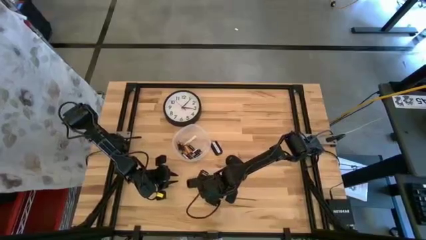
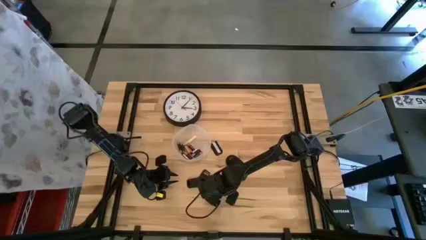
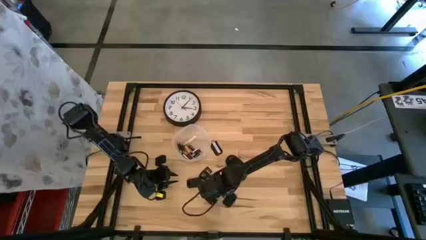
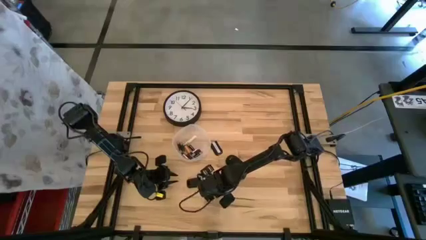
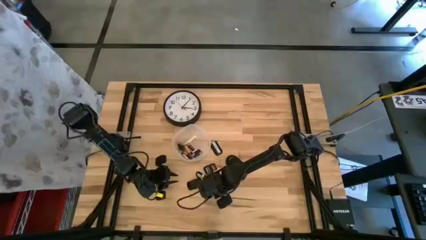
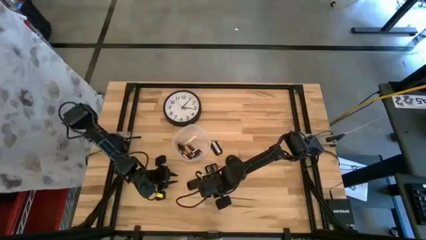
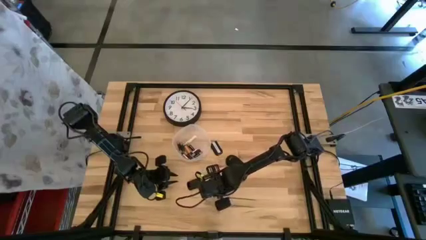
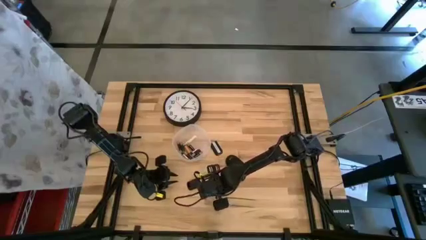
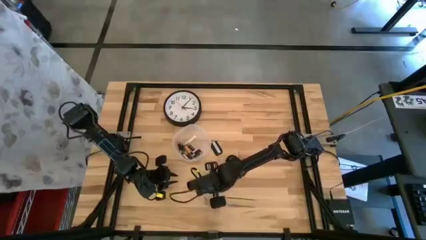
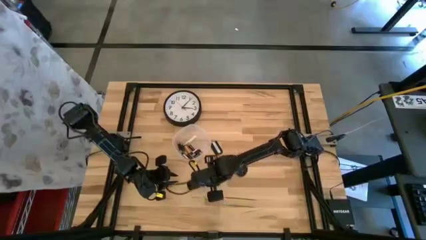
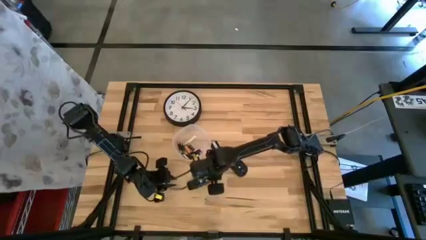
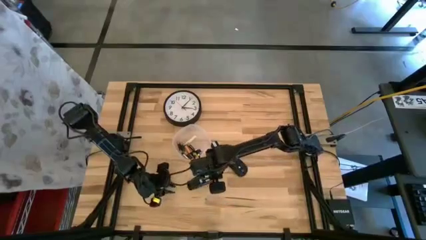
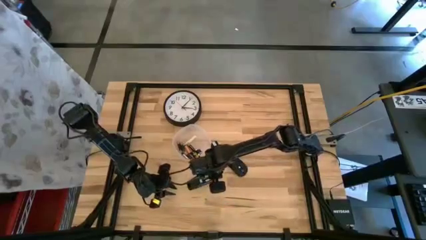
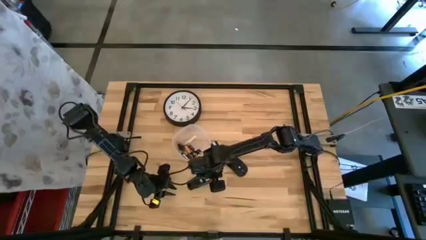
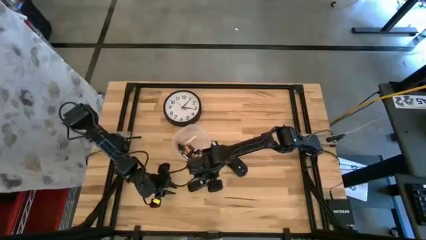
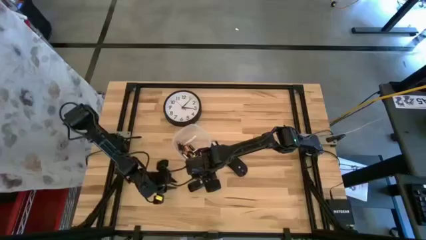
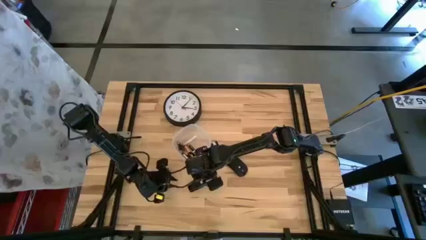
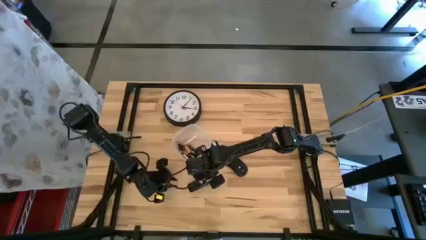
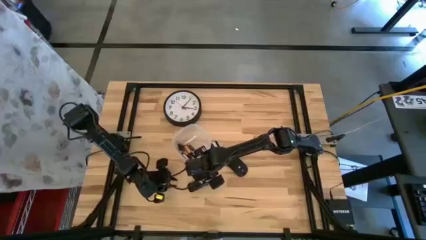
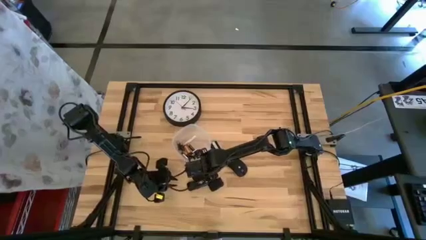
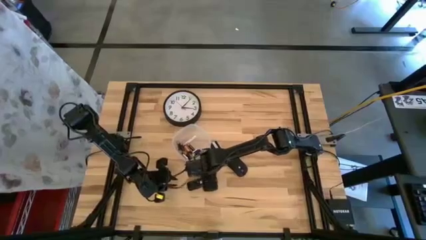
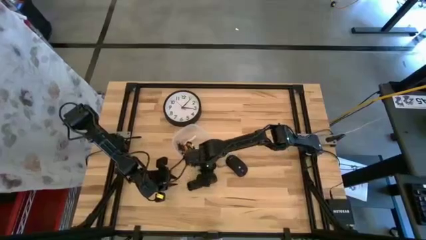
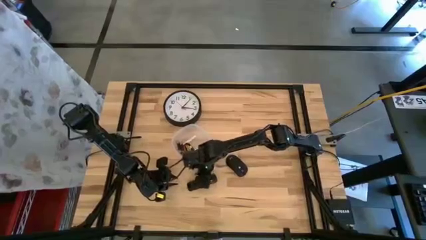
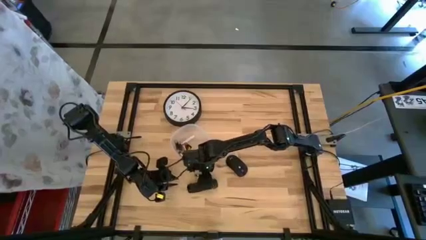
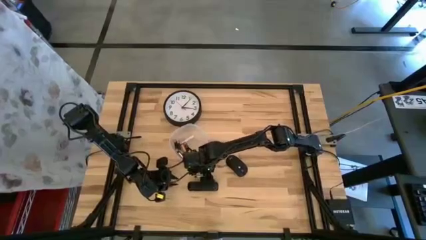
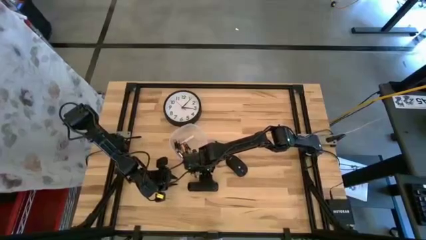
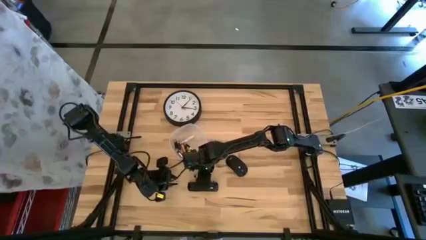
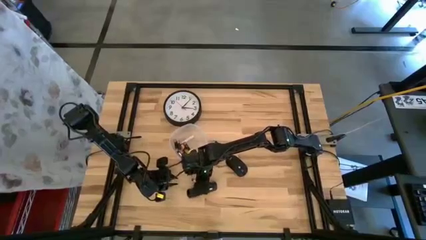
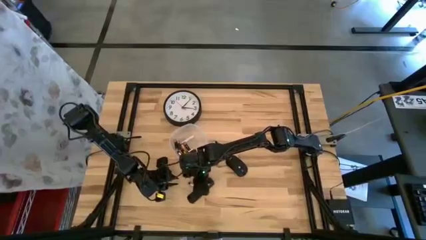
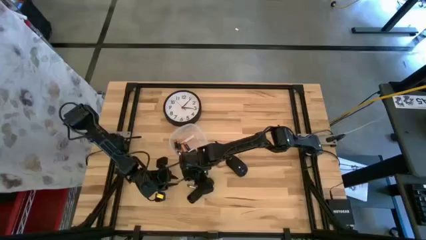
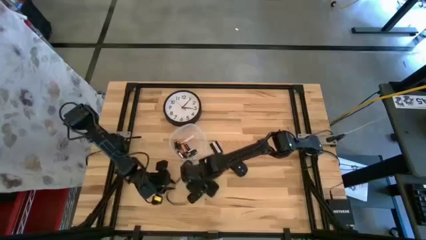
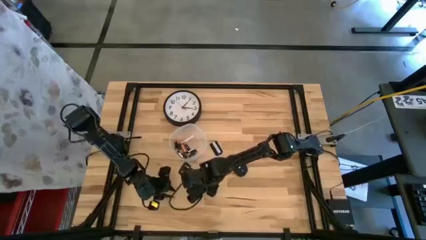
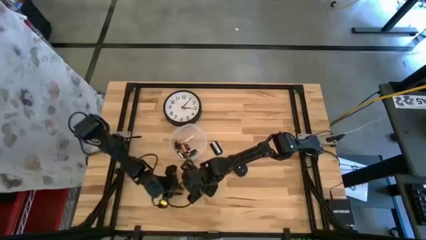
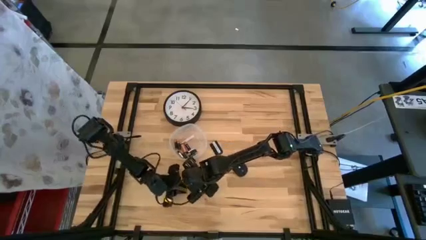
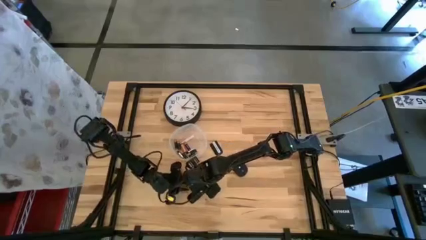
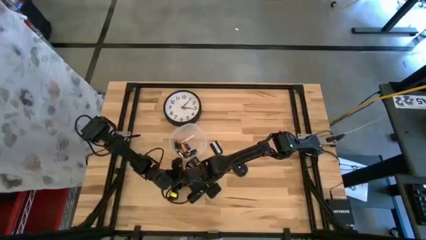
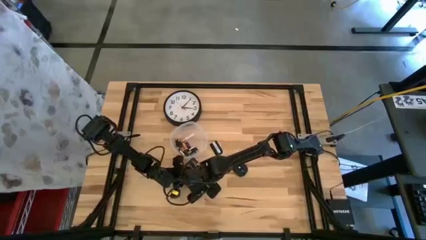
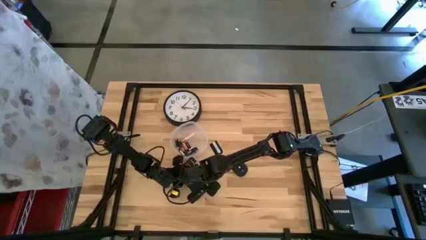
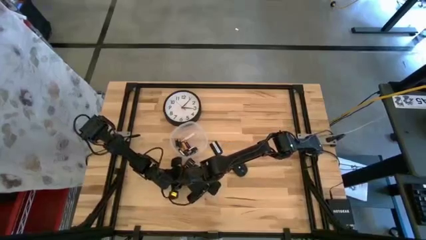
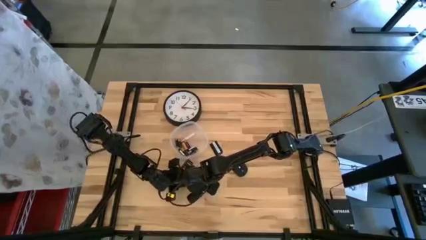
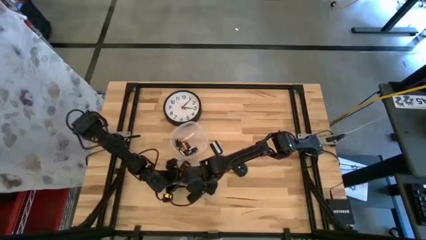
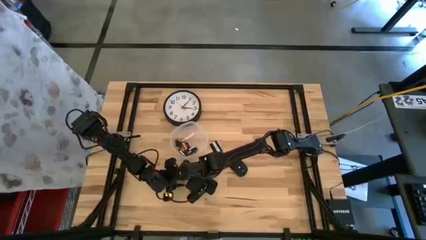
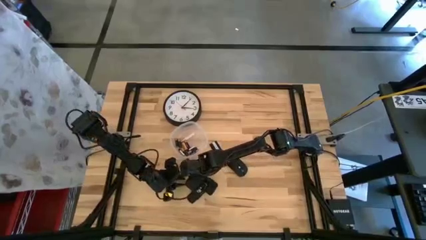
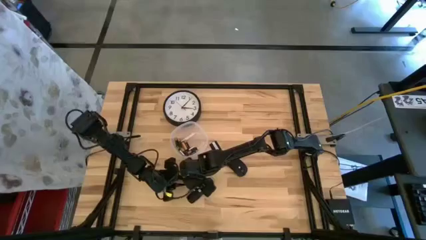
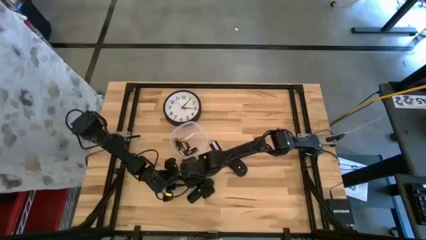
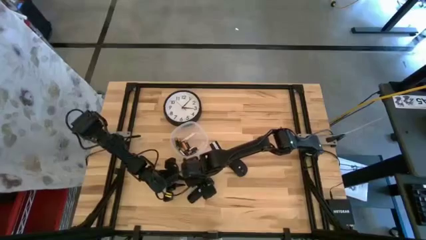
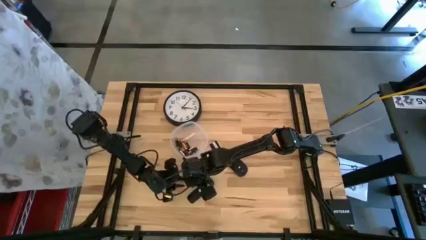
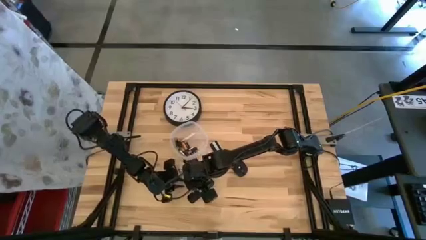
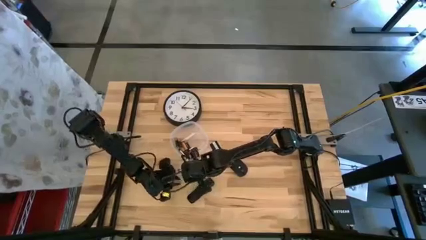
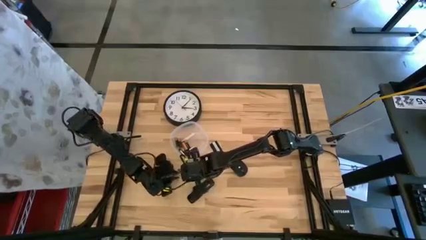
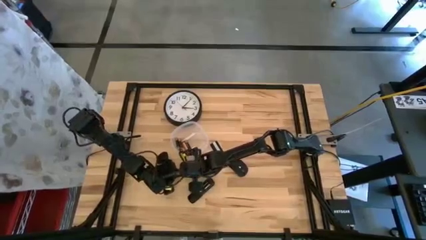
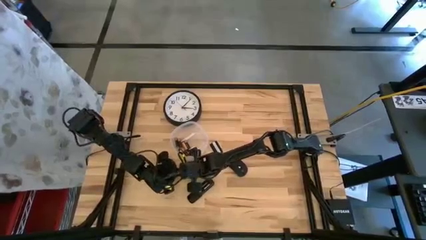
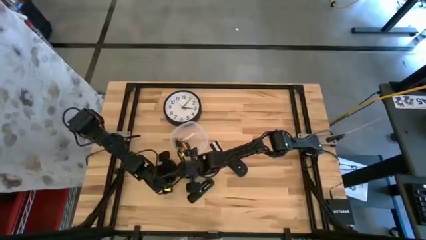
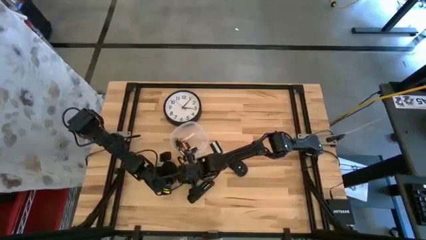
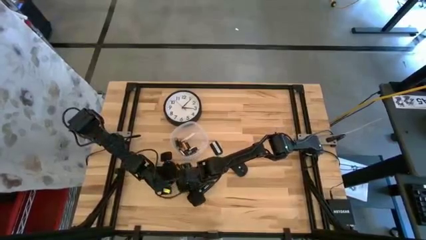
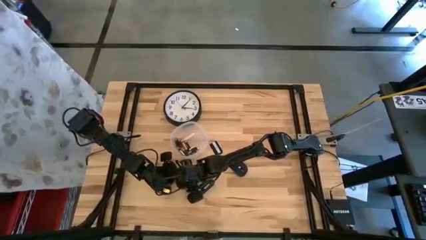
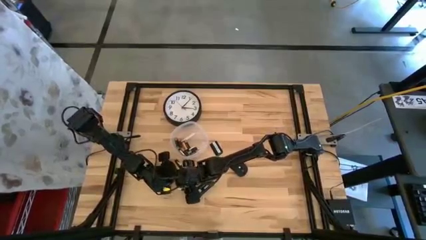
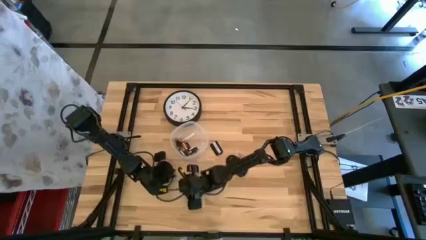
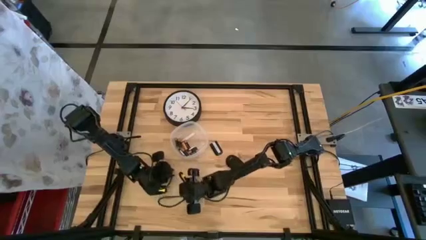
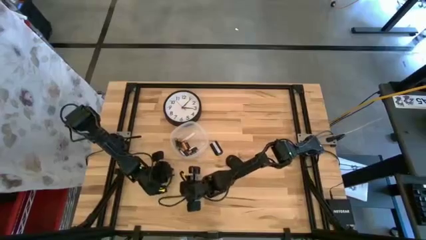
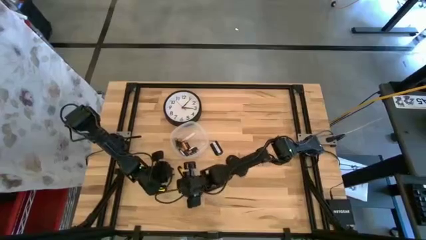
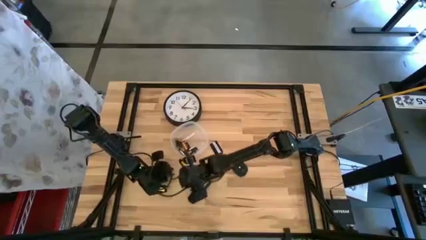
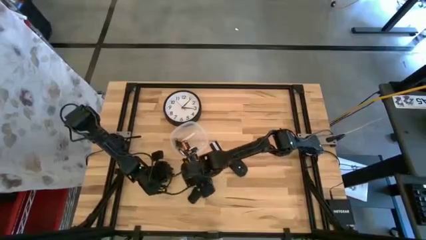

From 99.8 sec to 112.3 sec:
Task: Insert battery
Insert the silver battery into the remote control
